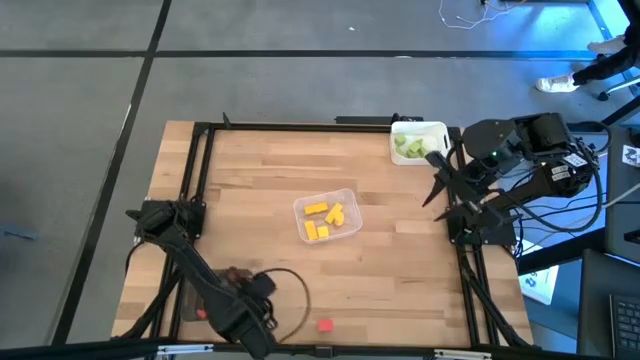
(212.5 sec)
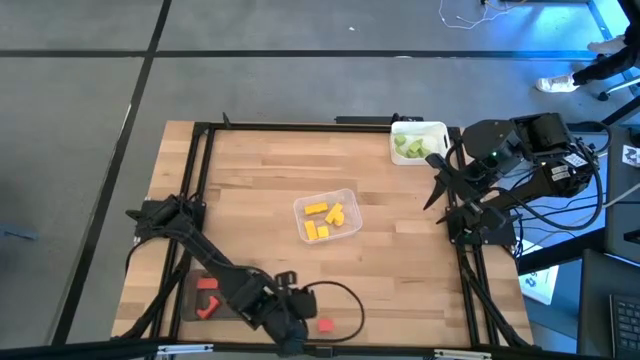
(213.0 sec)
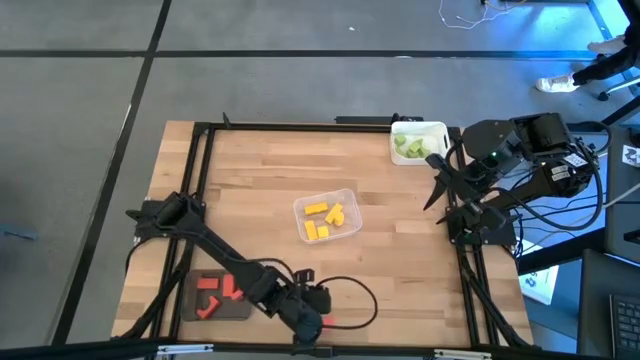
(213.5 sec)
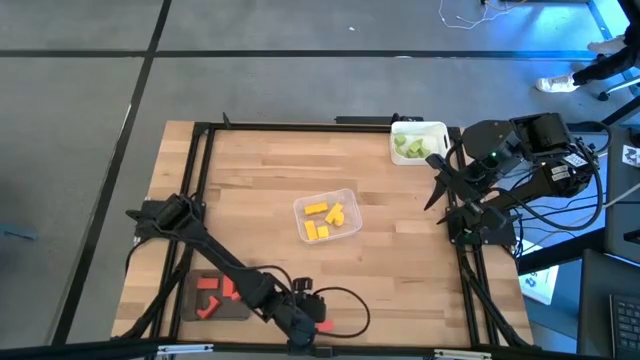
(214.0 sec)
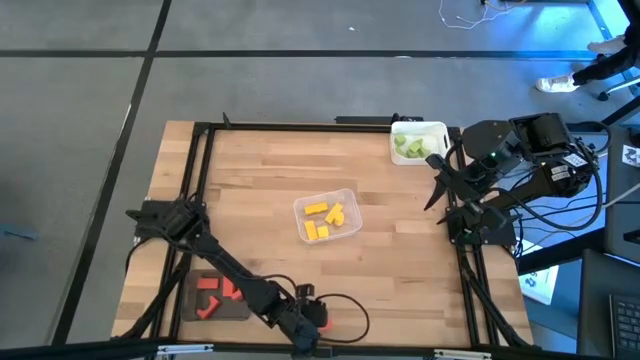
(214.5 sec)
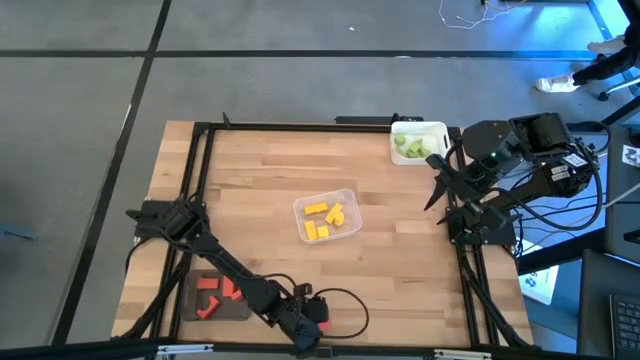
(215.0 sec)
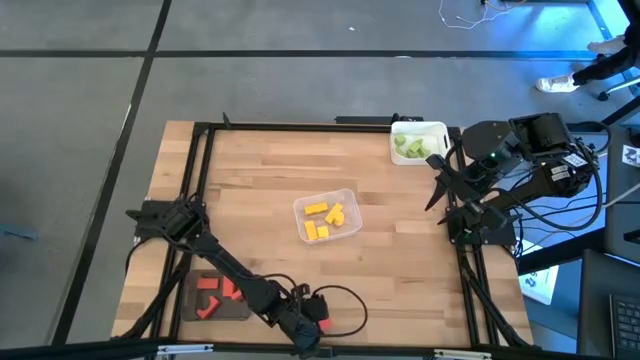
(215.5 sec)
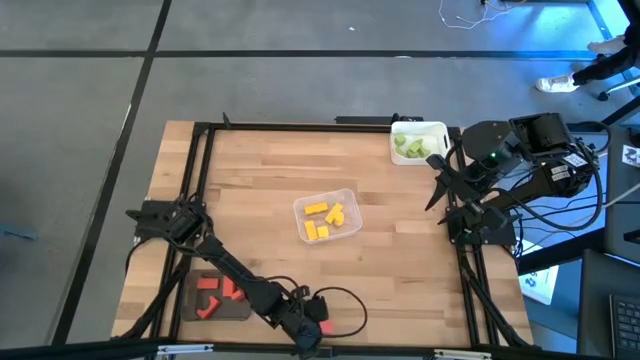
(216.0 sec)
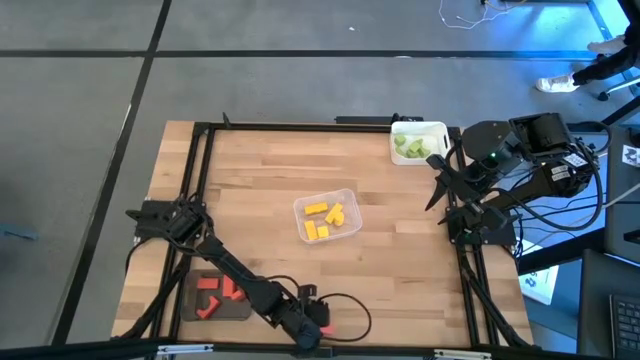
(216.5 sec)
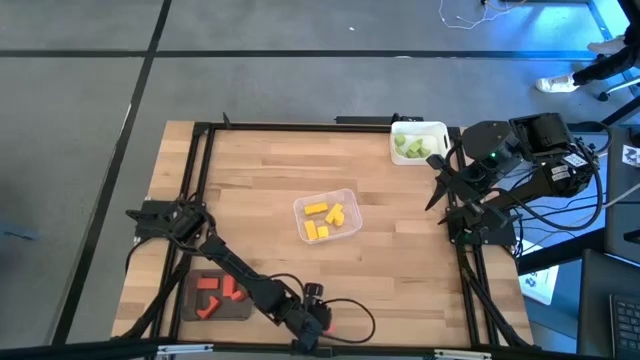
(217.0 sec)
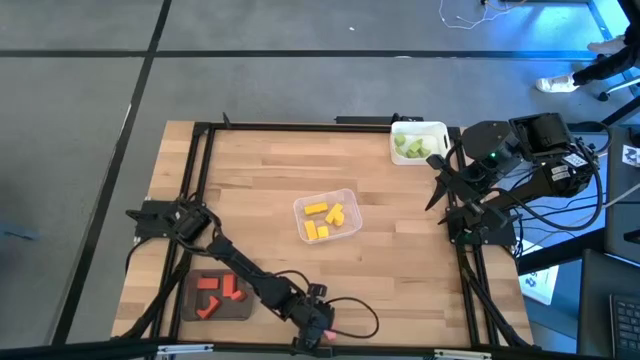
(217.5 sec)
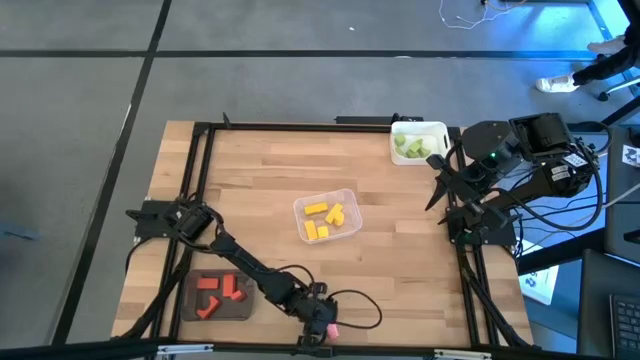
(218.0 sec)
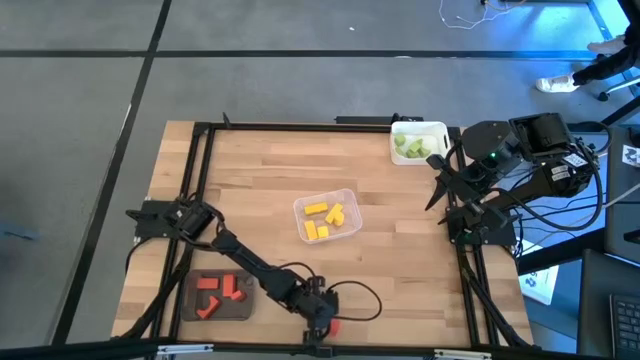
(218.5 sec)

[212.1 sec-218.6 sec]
Task: Sort & place blocks by color
Put the orange block into the black bin

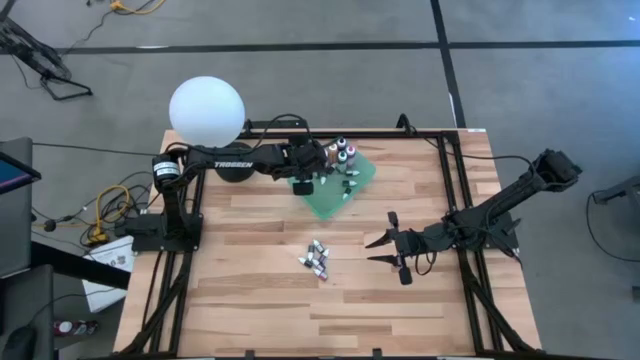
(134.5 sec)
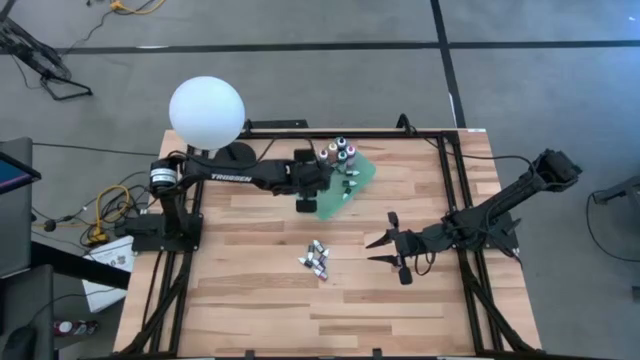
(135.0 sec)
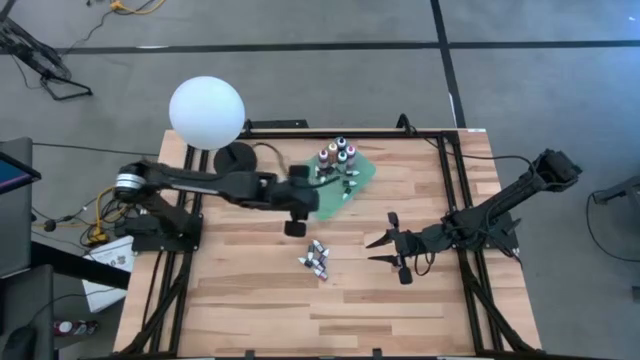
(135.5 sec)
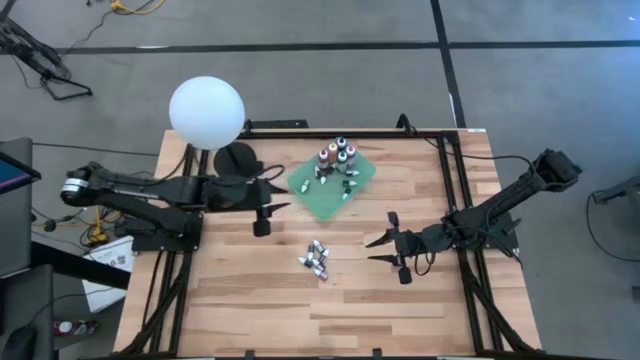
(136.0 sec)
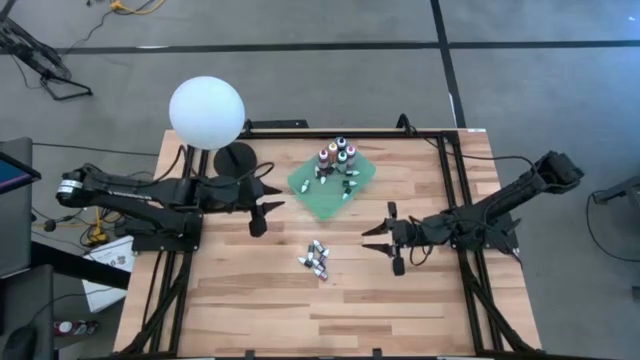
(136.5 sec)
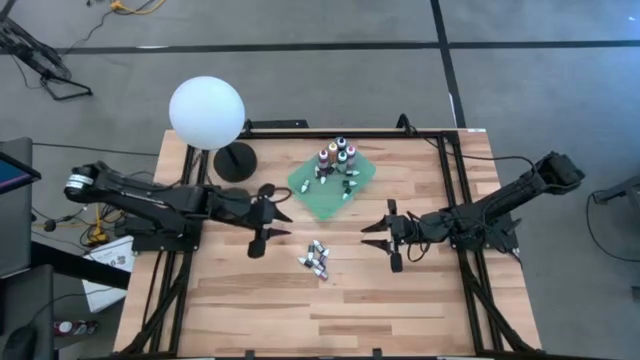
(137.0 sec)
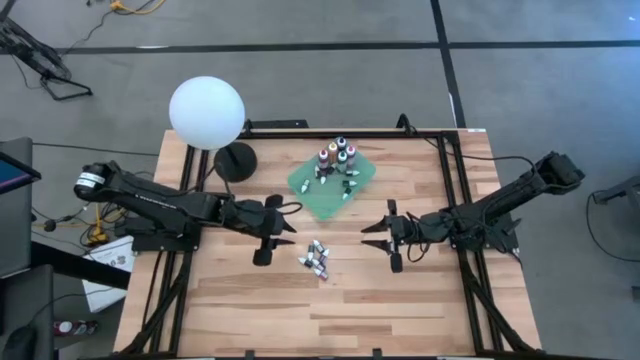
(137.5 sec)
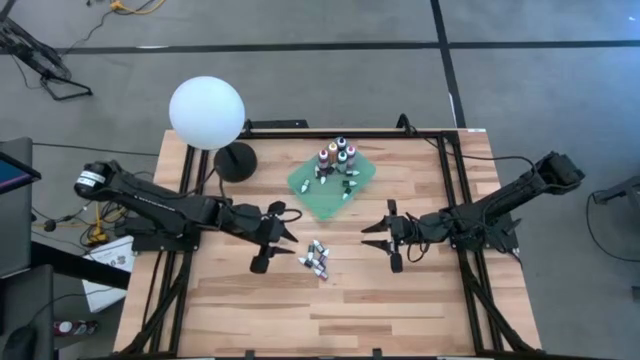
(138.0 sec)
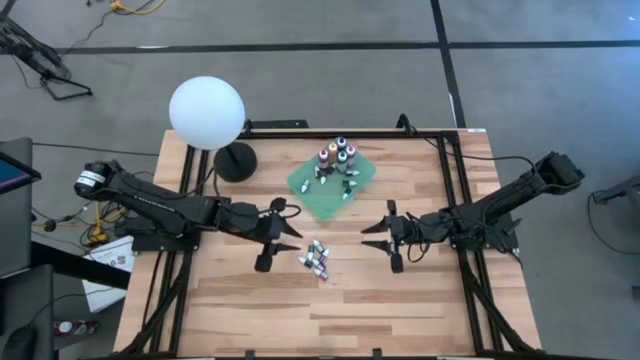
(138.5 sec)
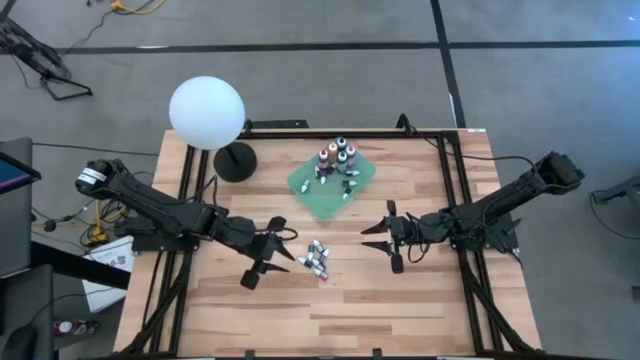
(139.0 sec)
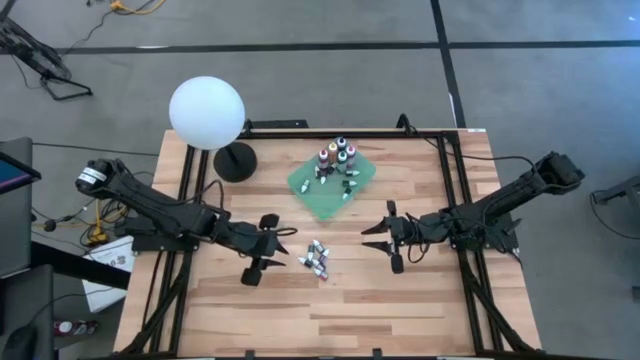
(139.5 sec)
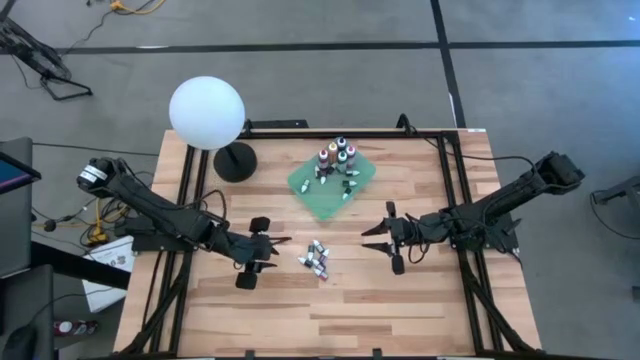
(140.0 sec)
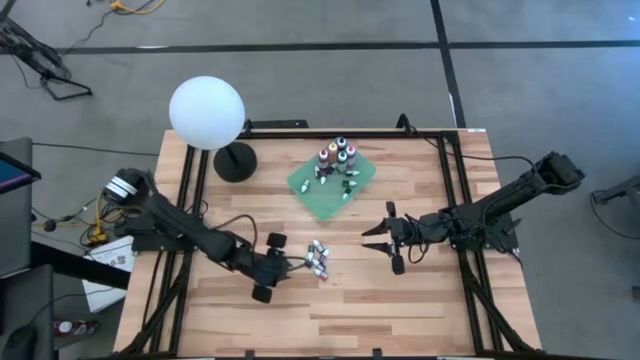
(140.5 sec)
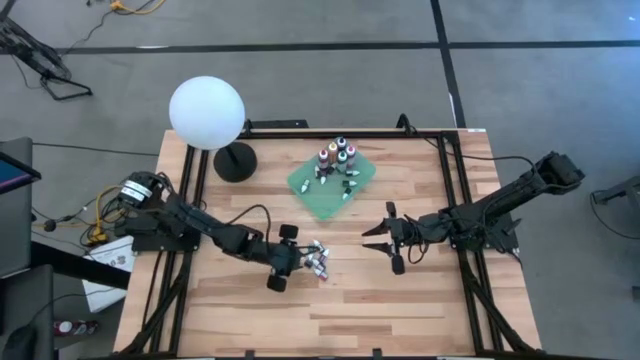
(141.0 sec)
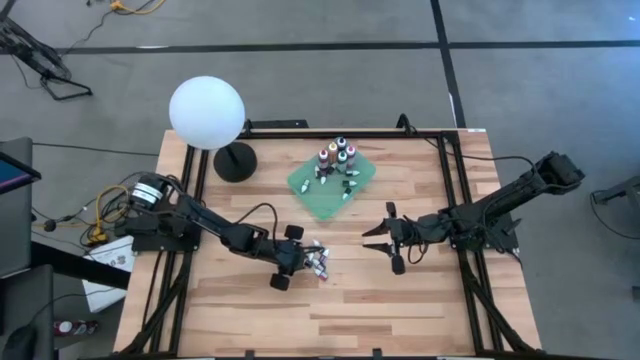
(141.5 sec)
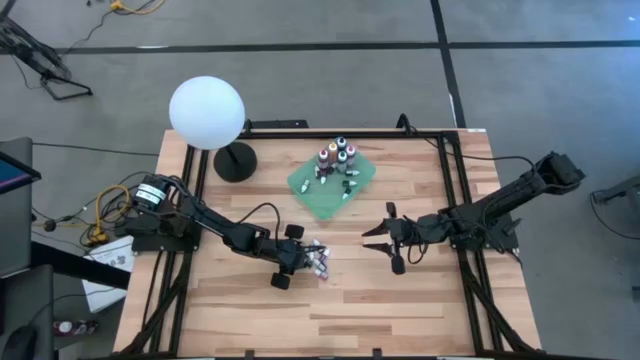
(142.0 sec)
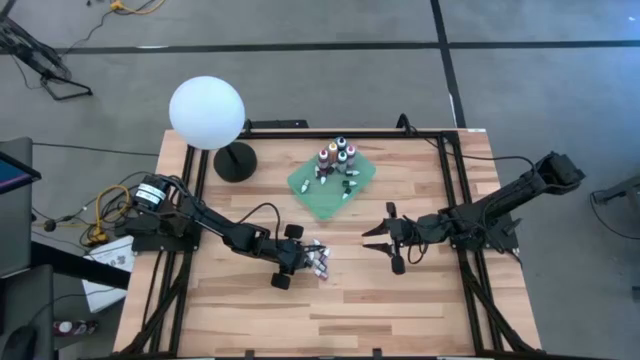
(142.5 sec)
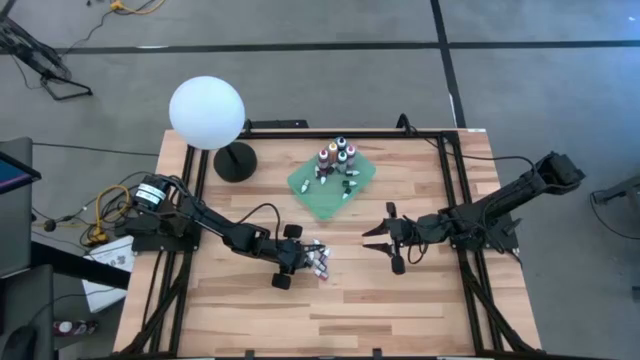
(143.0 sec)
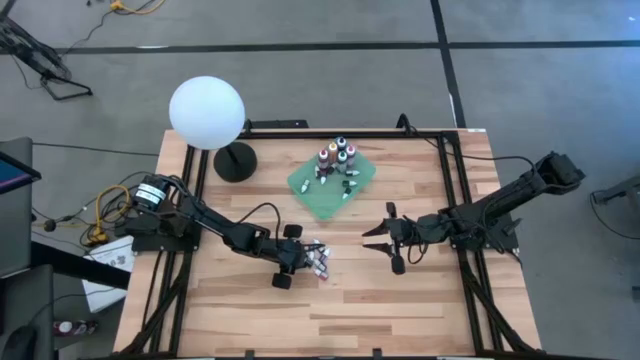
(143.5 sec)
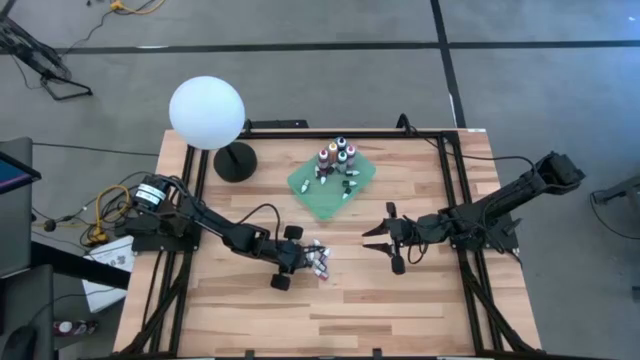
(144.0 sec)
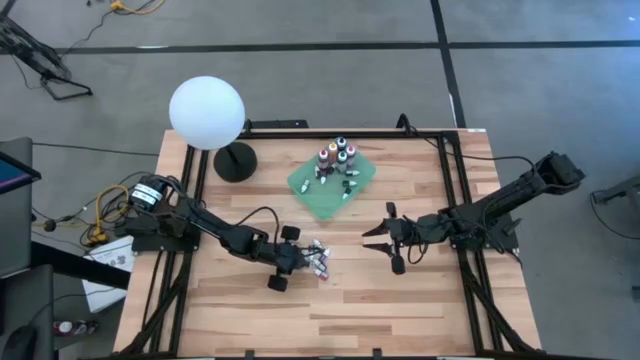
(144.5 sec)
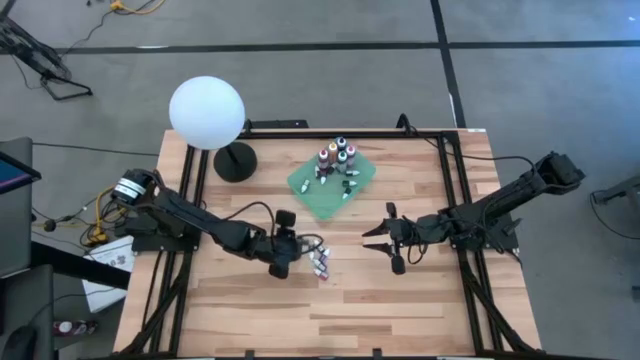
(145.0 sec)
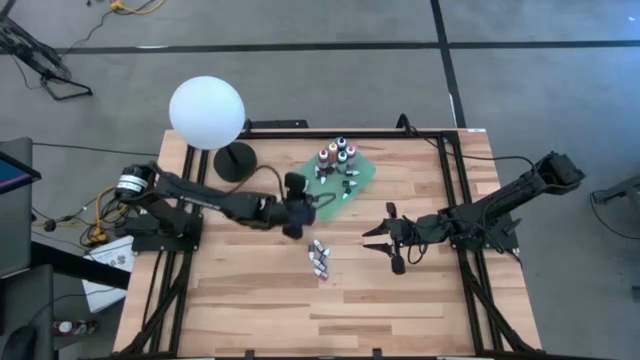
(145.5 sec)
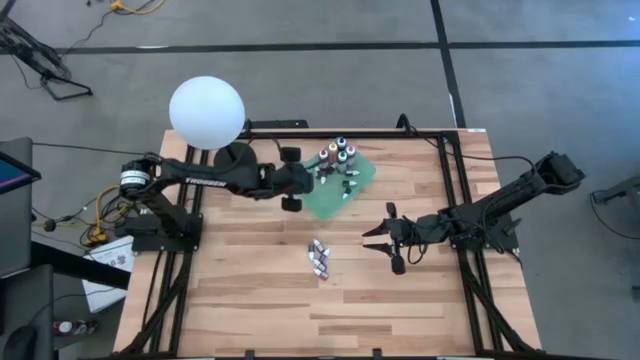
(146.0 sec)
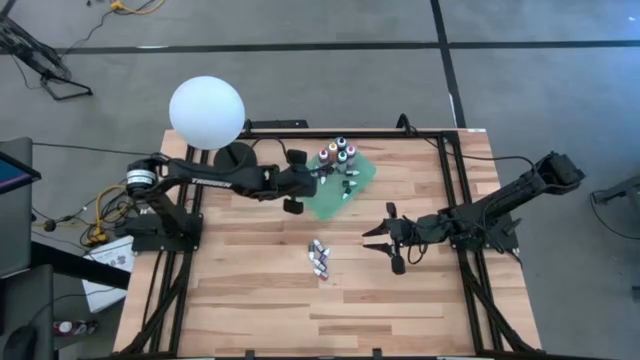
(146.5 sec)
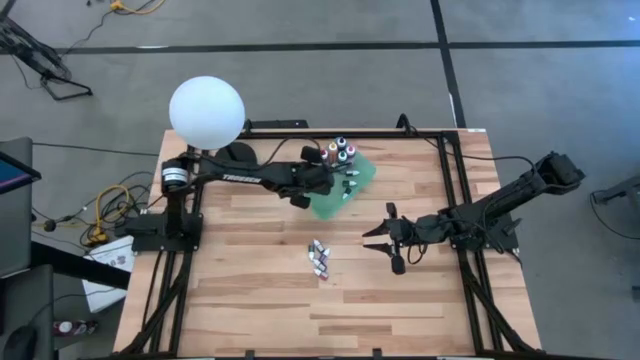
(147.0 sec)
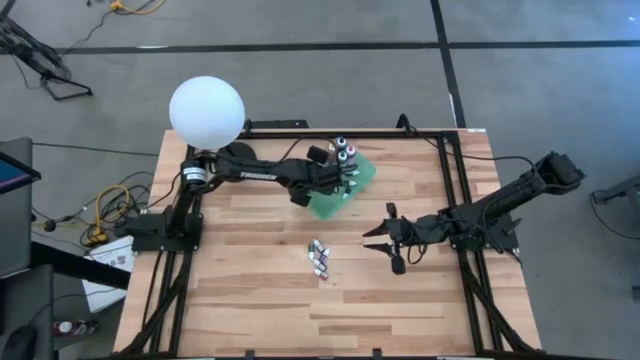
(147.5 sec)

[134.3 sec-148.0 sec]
Task: Pick & Place food coloring
Put the black food coloring bottle into the green bin
